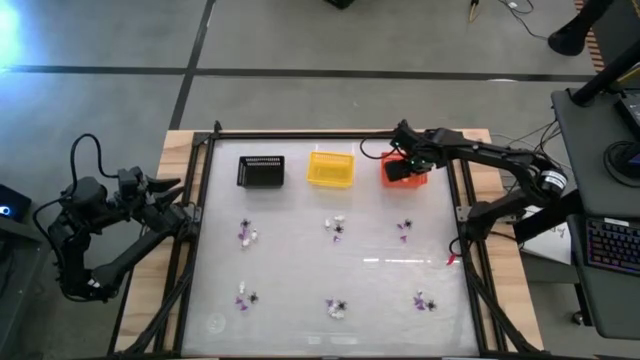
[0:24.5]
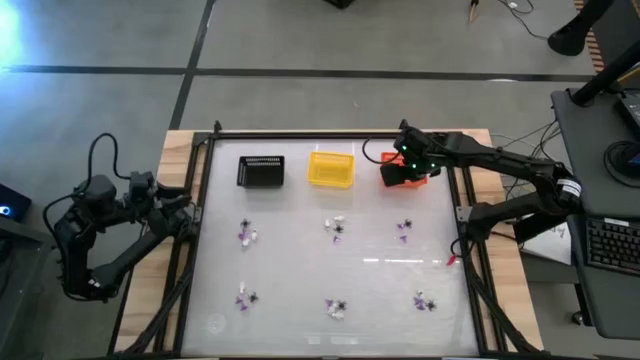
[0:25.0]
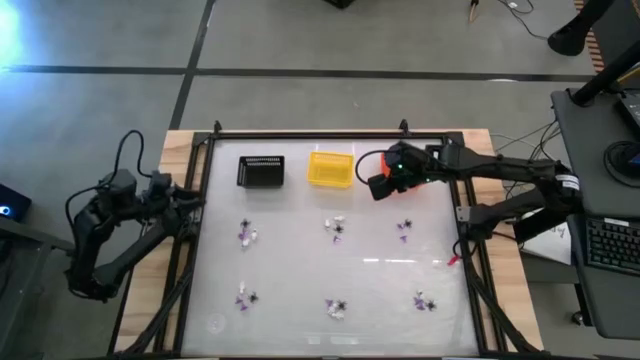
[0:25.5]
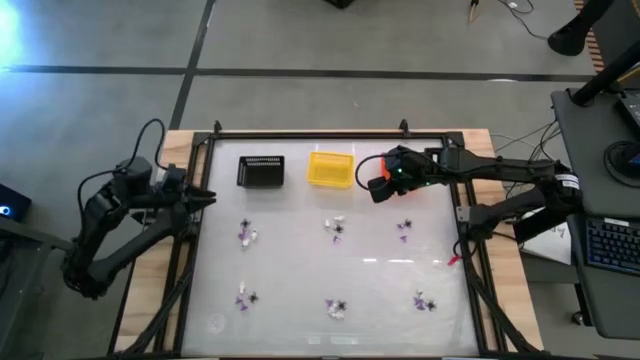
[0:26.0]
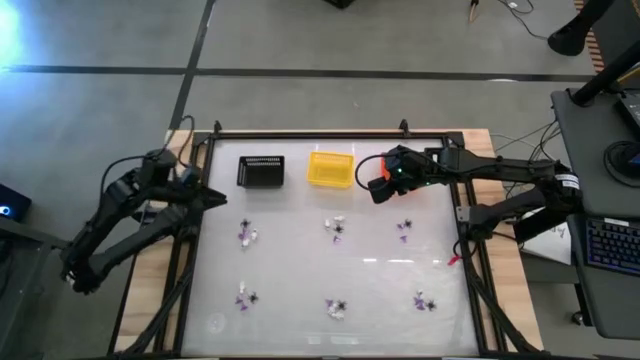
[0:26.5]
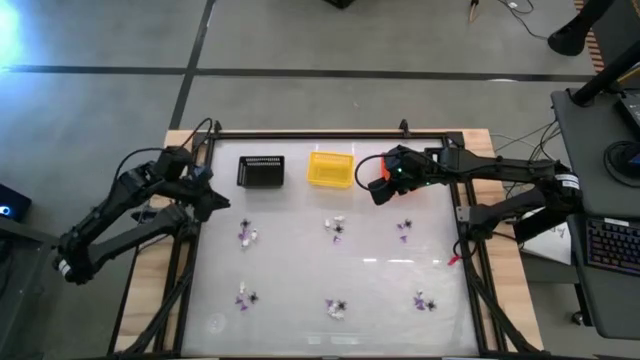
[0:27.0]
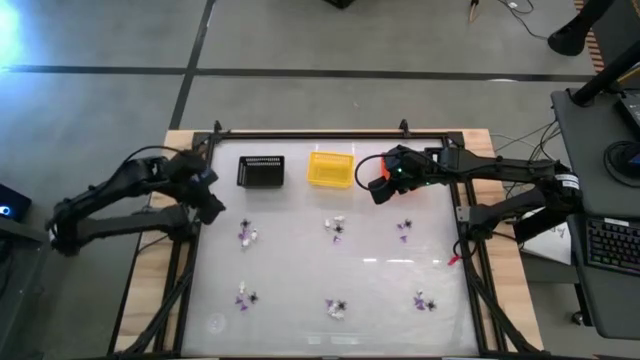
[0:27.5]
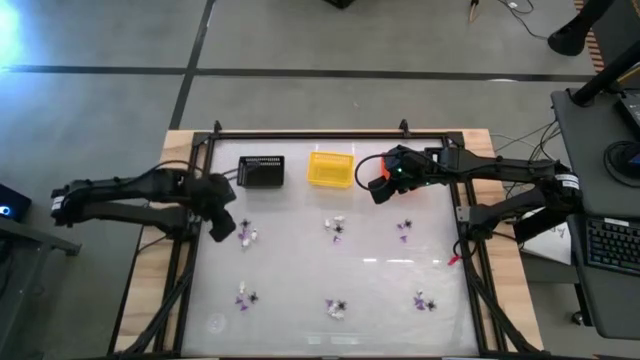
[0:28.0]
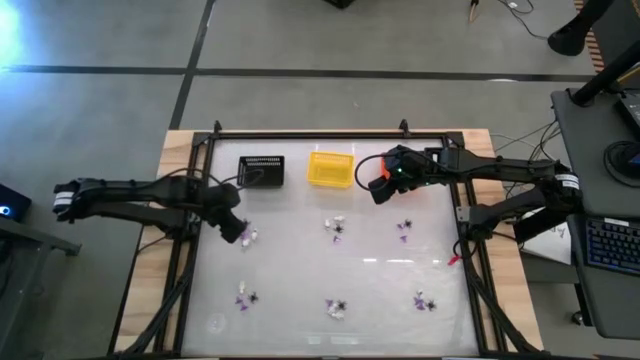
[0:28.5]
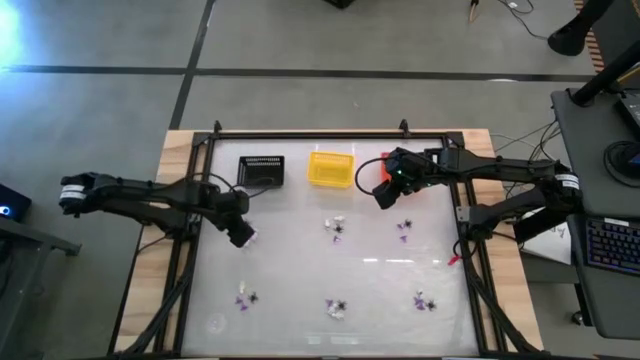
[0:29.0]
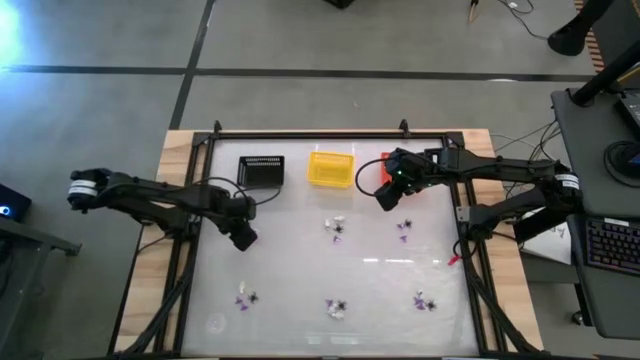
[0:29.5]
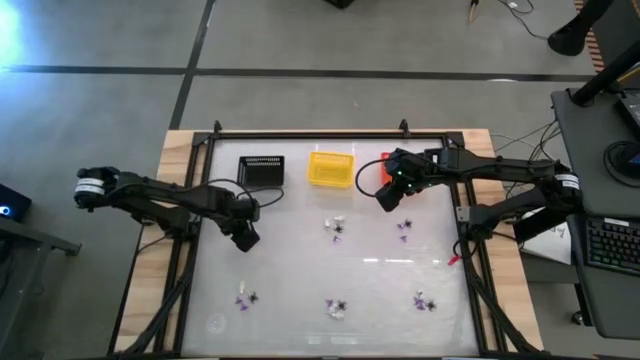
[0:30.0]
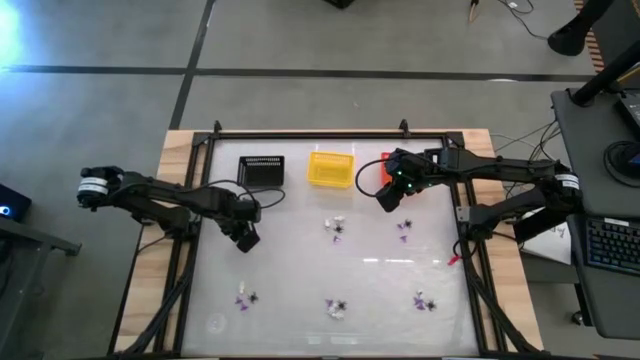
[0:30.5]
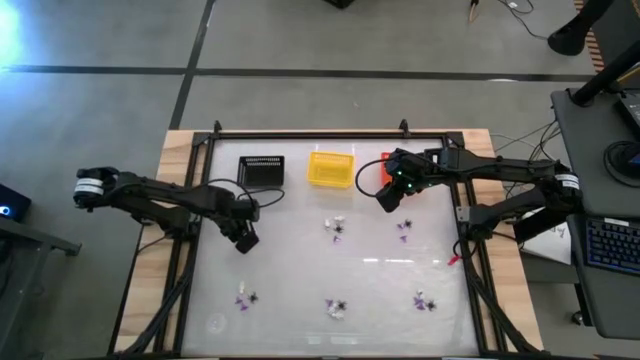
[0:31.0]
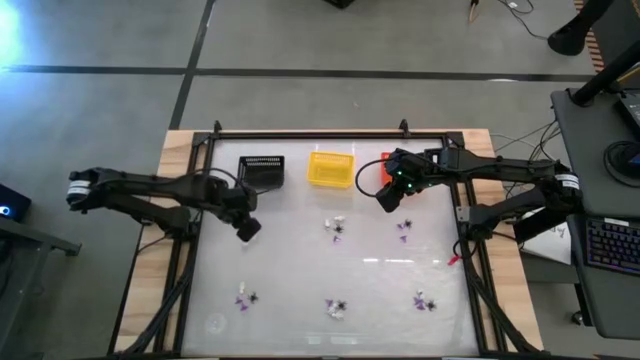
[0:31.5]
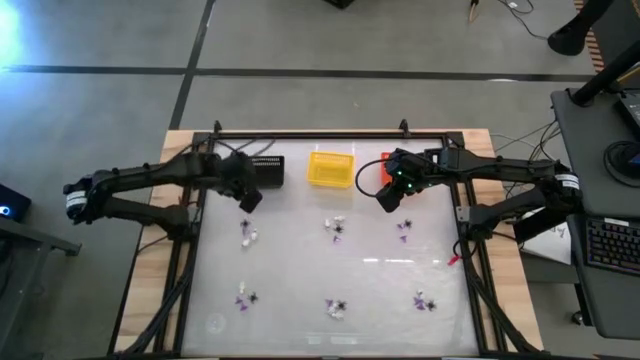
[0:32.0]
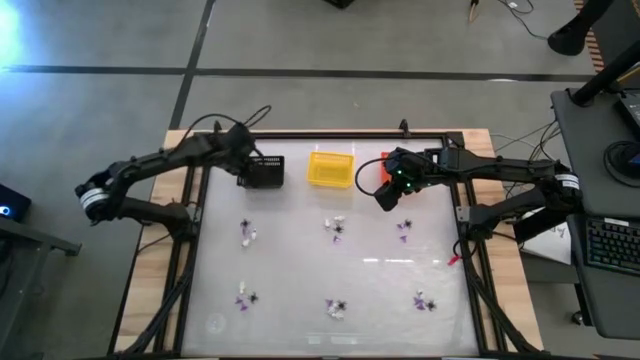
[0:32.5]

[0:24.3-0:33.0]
Task: Sort Halloween decoration
Put the violet hat toy into the black bin

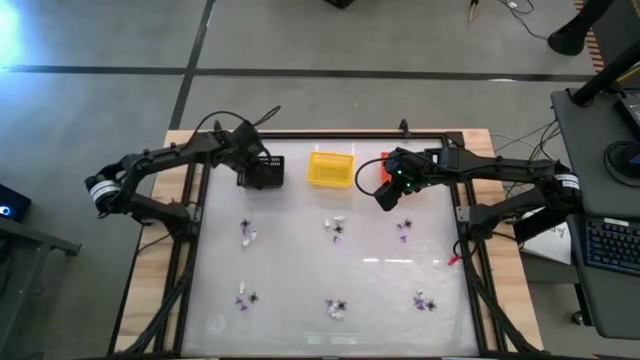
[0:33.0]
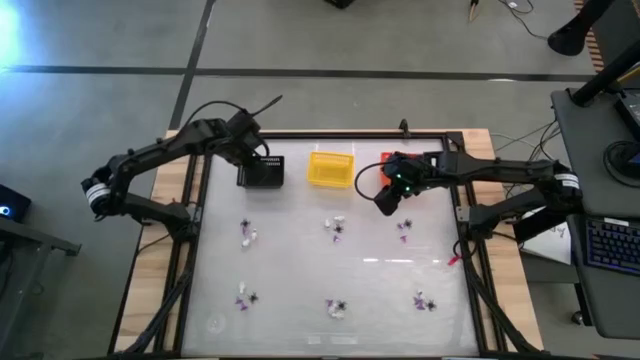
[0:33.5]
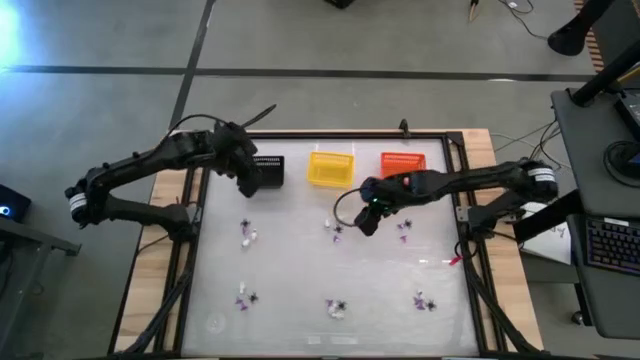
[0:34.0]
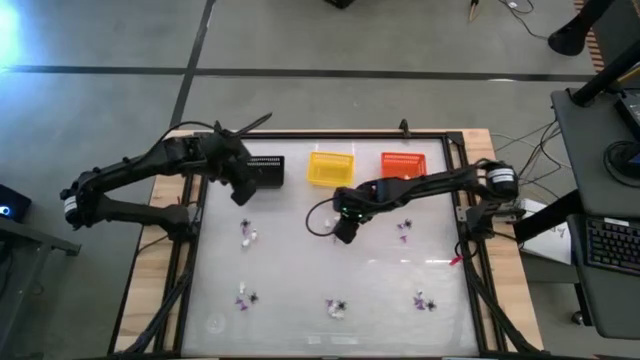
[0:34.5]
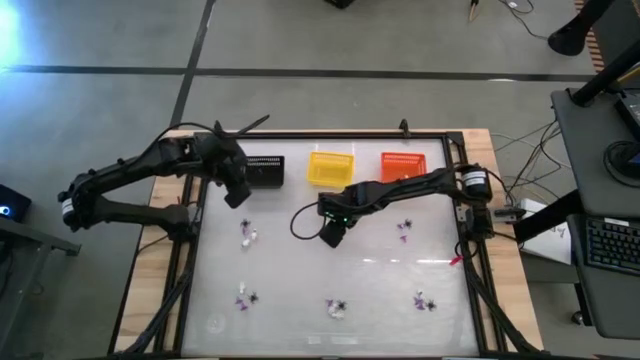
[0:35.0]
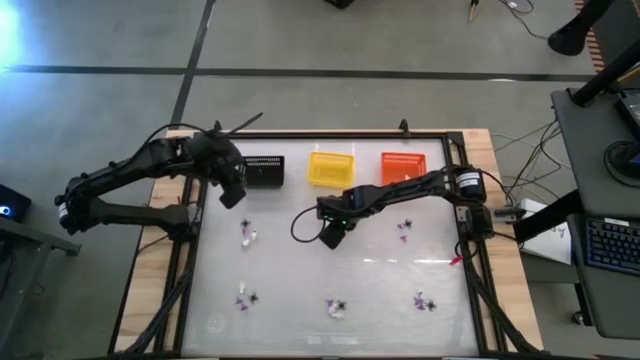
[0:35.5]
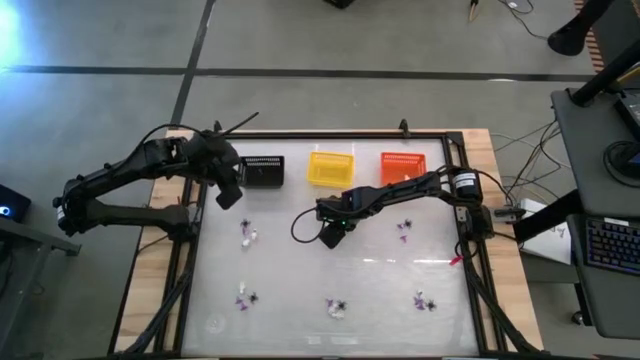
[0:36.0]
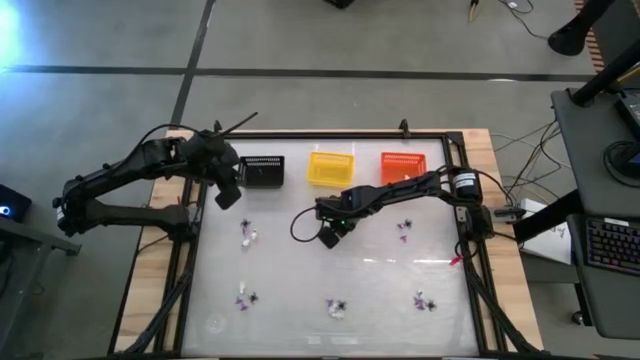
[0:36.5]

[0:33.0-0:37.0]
Put the black spider toy into the yellow bin

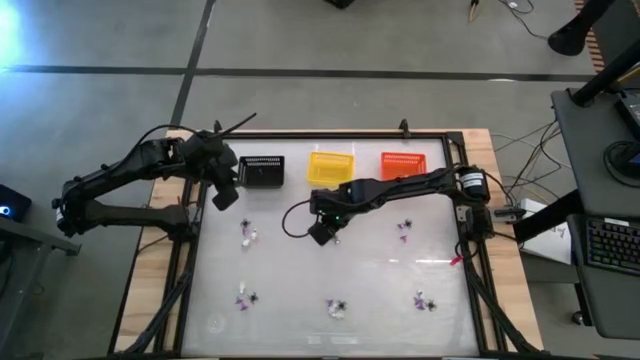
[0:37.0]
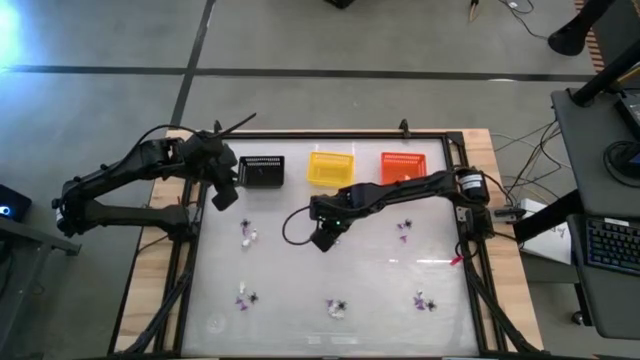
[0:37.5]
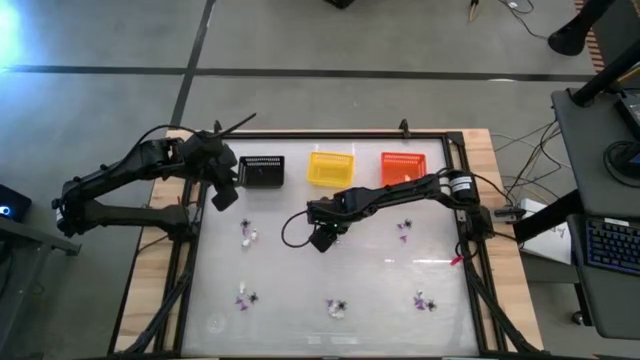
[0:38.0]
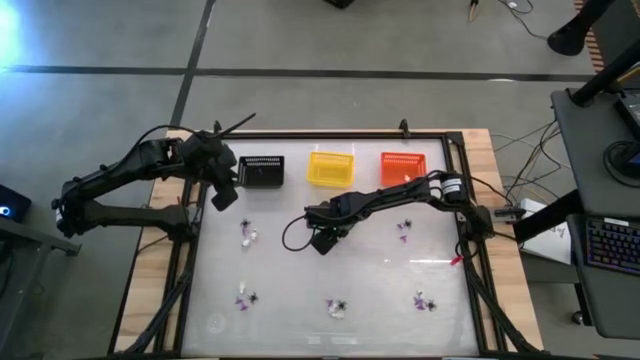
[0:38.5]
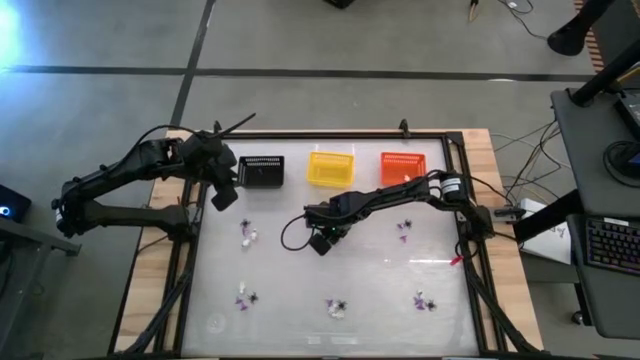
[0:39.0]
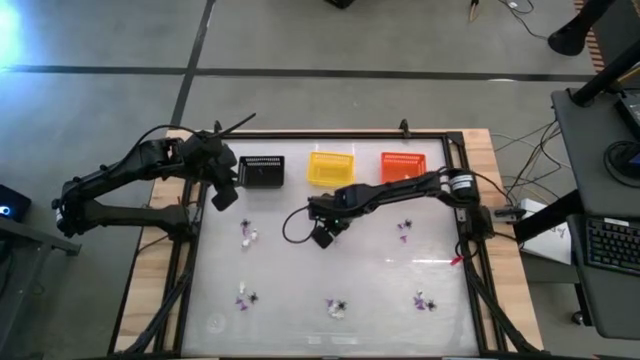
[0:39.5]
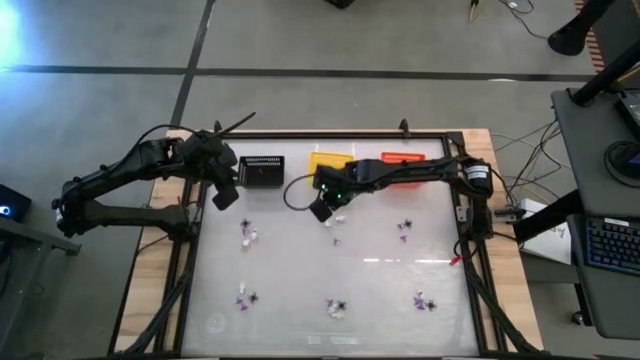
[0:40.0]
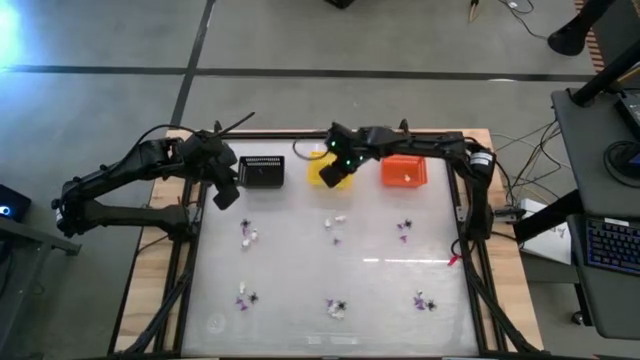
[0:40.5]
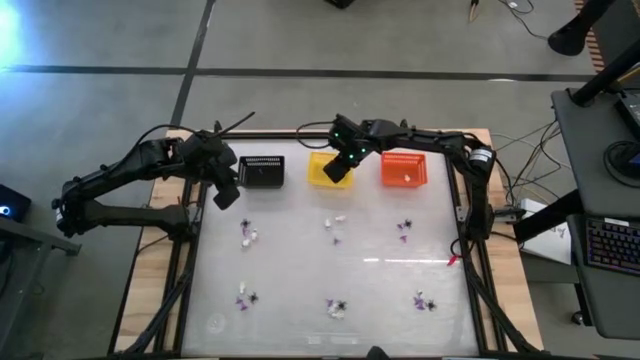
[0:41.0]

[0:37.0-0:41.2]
Put the black spider toy into the yellow bin

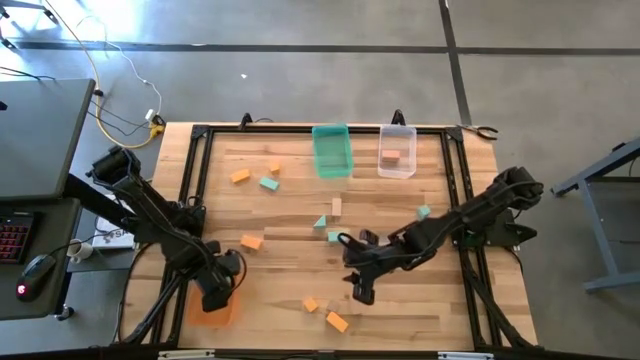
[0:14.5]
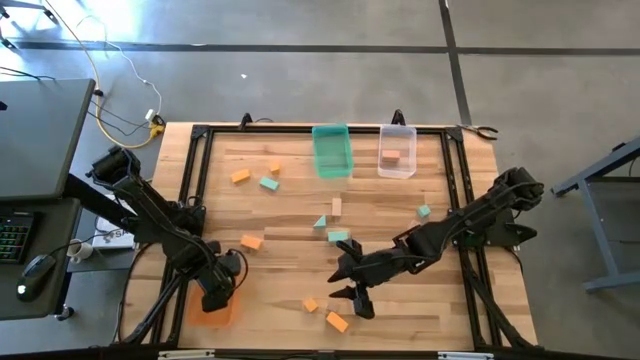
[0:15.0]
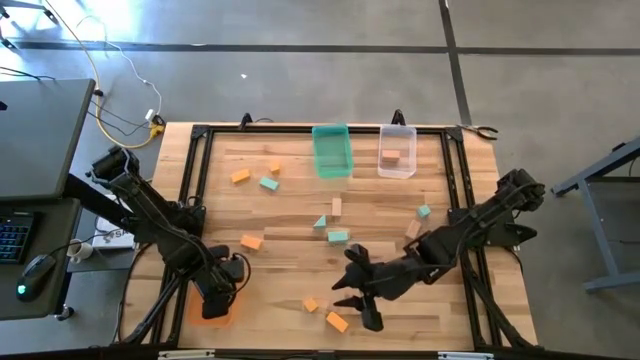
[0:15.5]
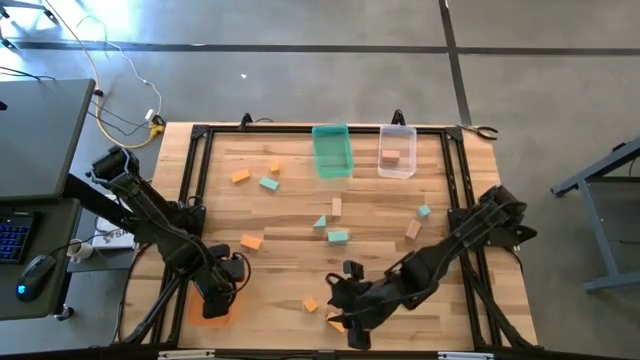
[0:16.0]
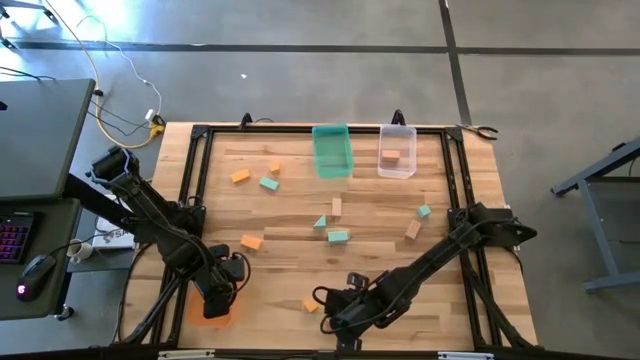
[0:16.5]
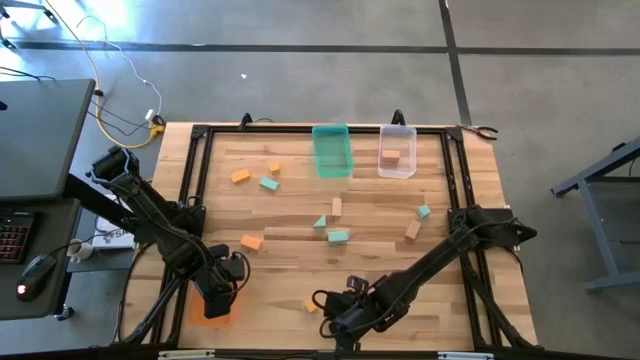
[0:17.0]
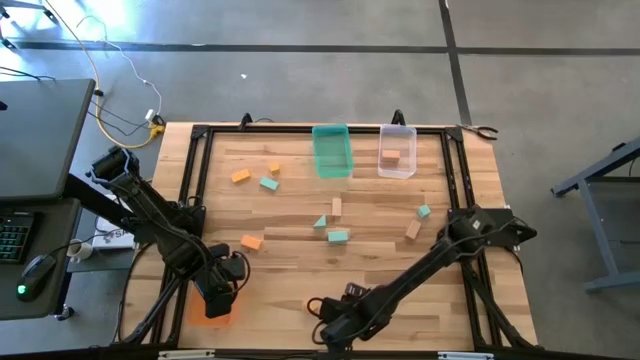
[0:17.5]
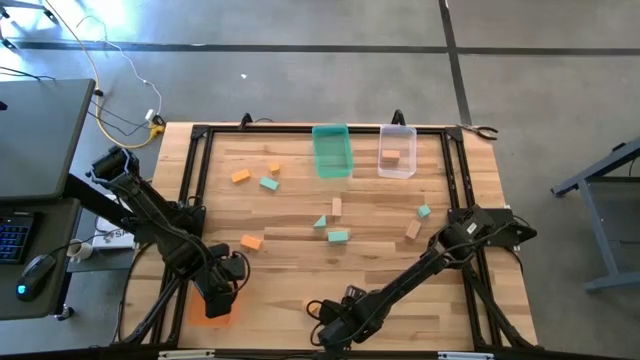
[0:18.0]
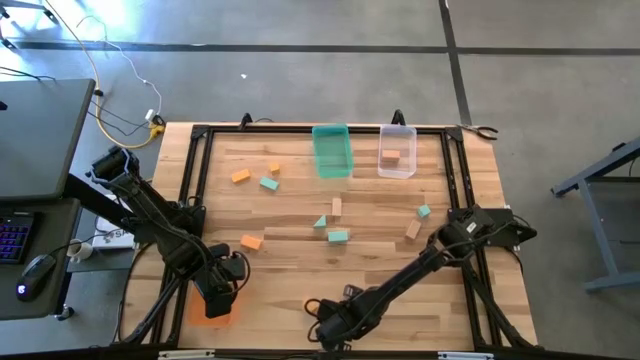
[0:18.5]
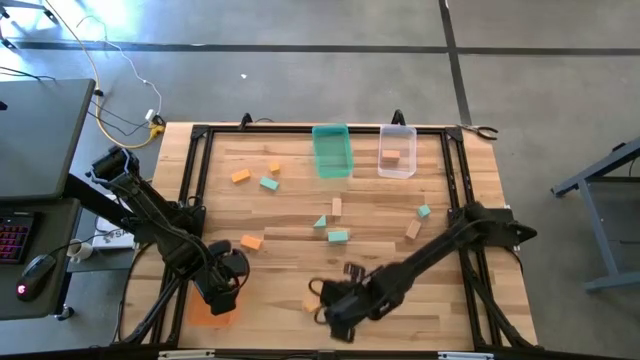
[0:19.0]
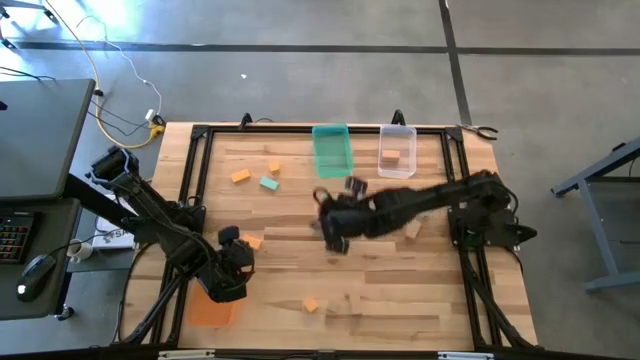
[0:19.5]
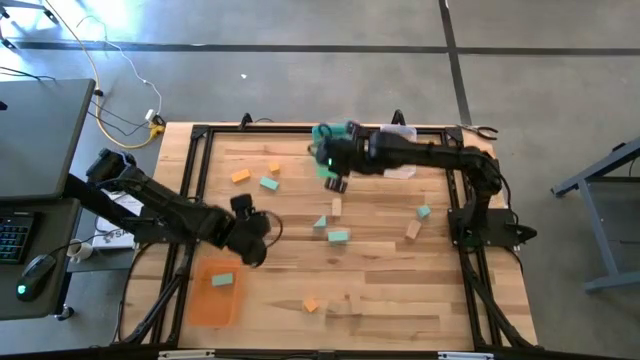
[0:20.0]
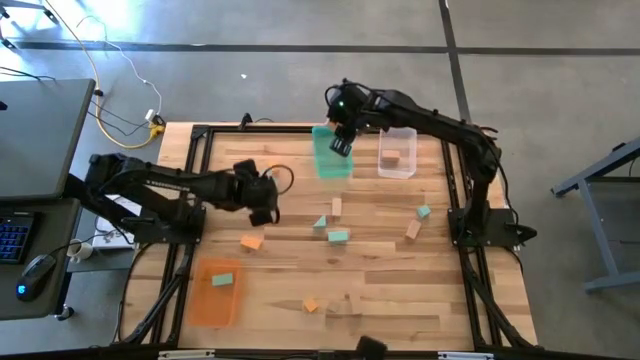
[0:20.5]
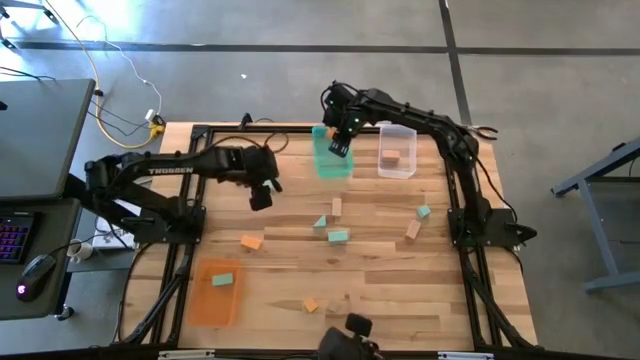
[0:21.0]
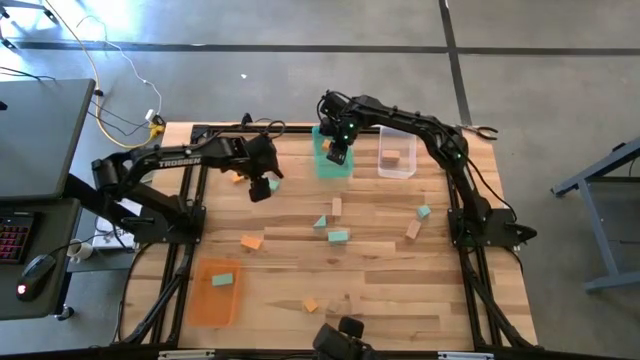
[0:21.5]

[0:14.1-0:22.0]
Task: Sort & place blocks by color
Put the yellow block into the blue bin
